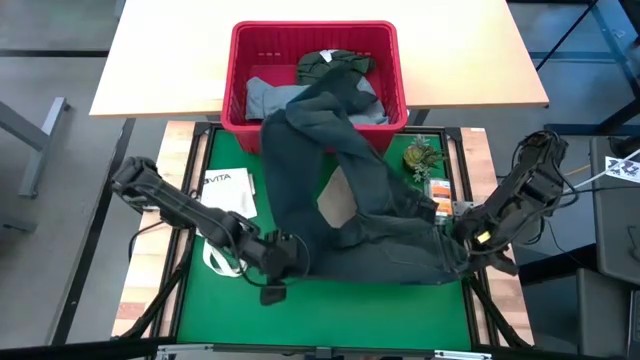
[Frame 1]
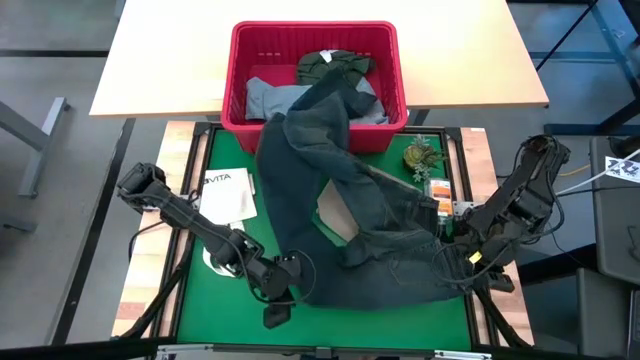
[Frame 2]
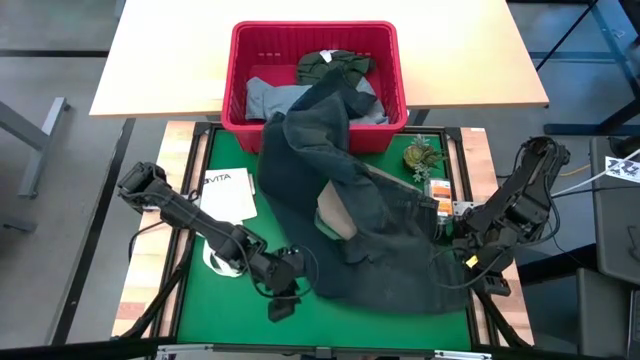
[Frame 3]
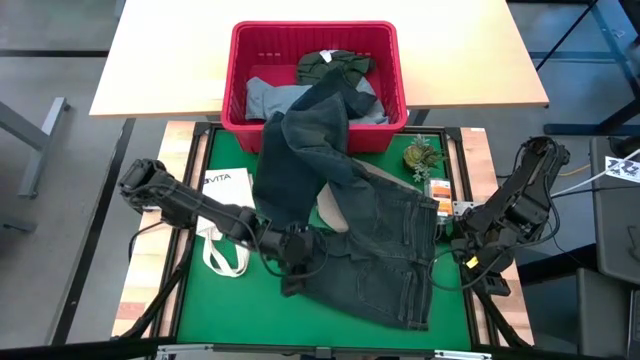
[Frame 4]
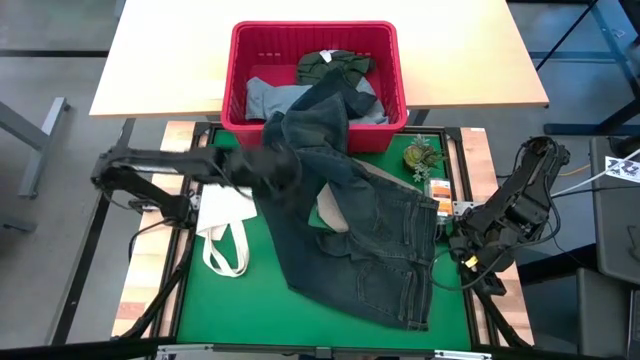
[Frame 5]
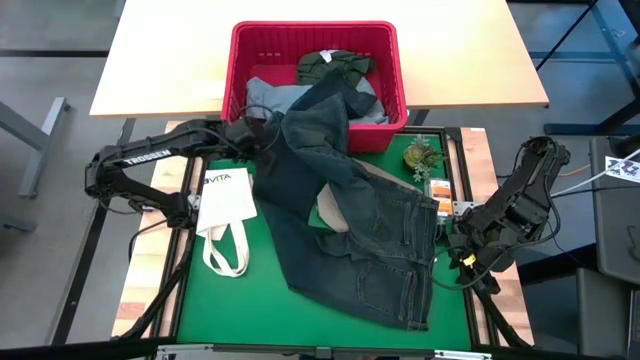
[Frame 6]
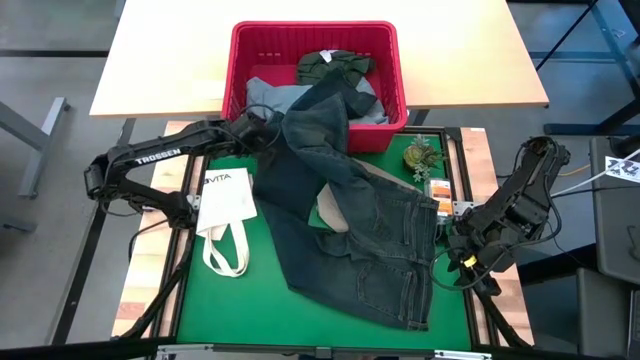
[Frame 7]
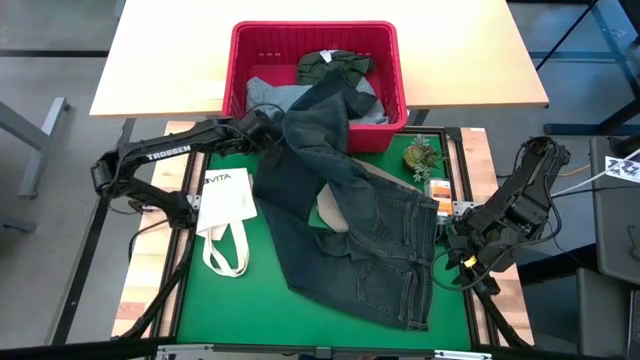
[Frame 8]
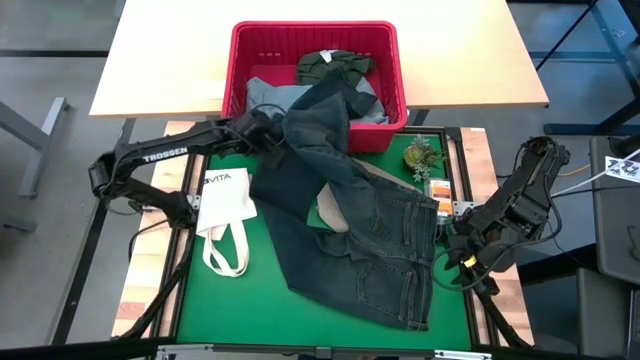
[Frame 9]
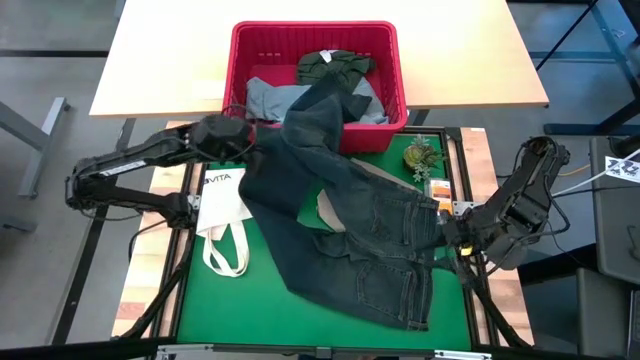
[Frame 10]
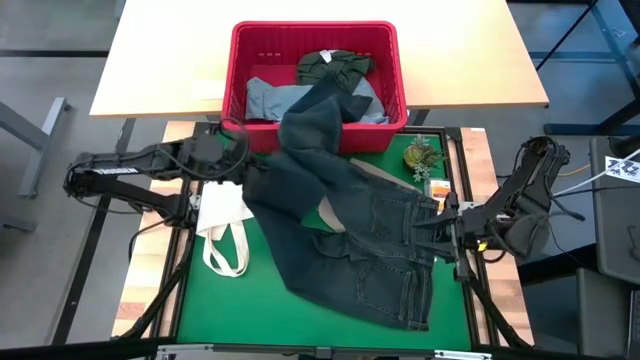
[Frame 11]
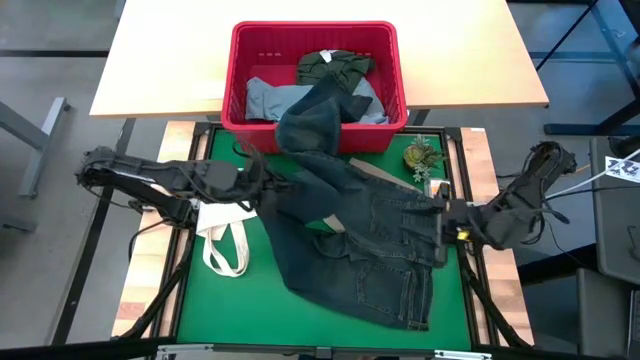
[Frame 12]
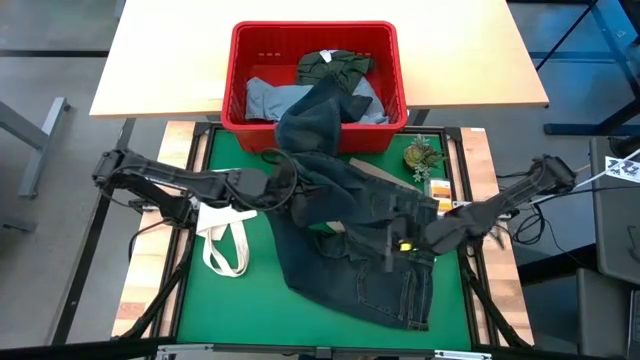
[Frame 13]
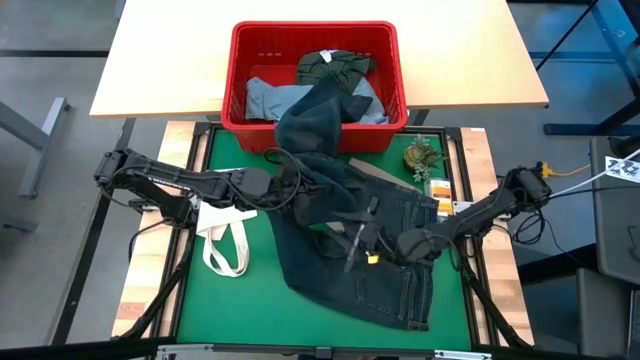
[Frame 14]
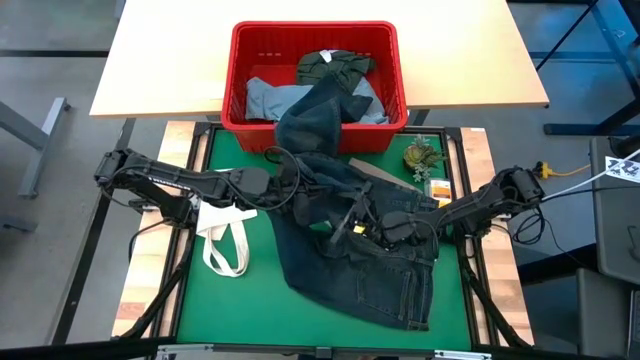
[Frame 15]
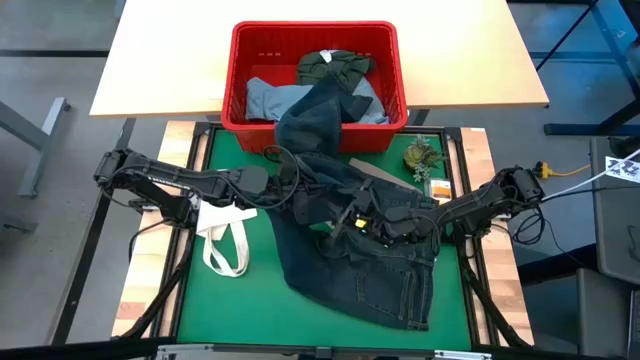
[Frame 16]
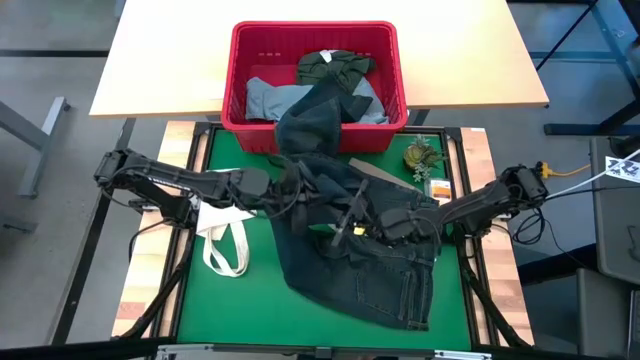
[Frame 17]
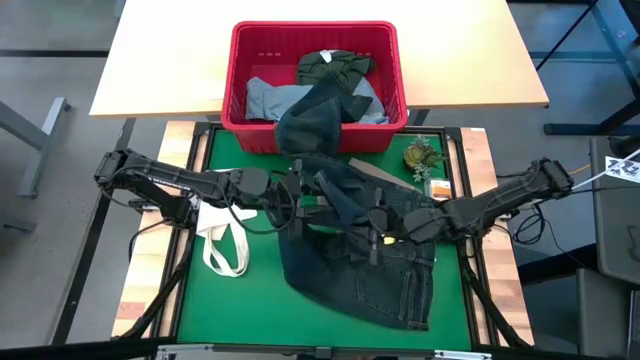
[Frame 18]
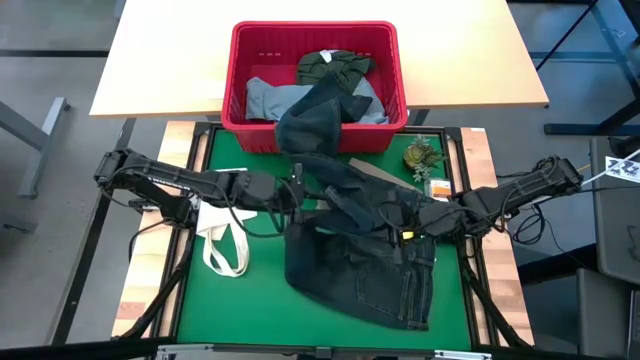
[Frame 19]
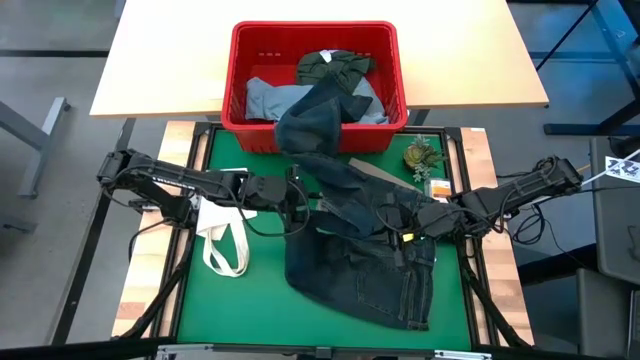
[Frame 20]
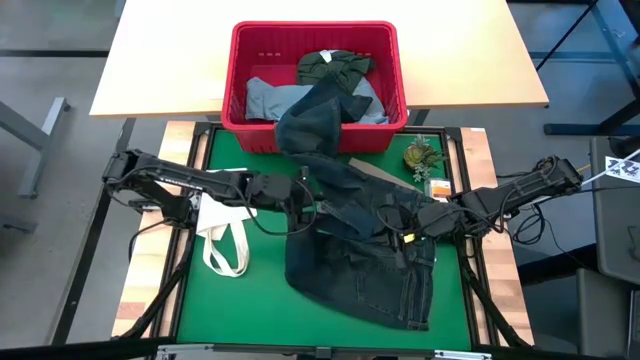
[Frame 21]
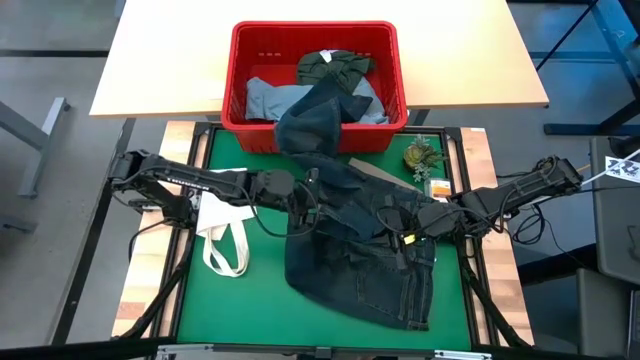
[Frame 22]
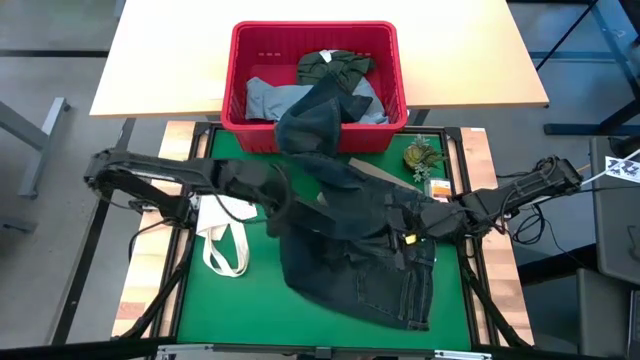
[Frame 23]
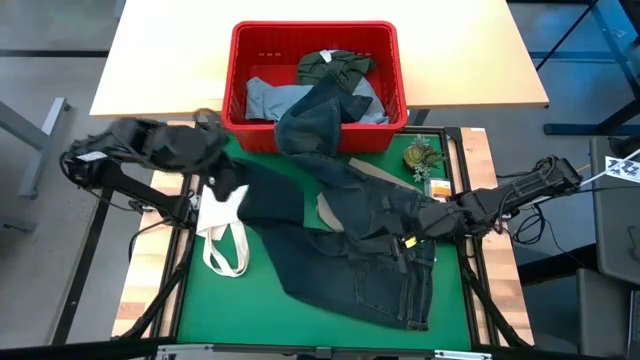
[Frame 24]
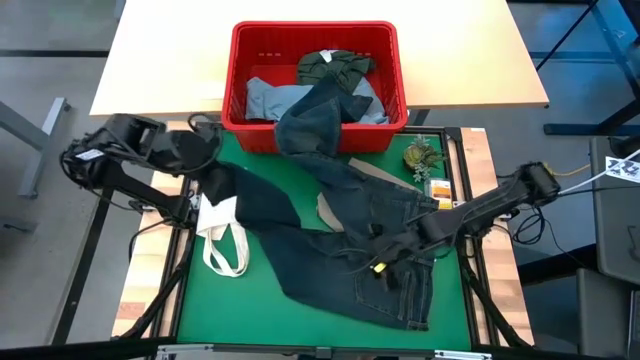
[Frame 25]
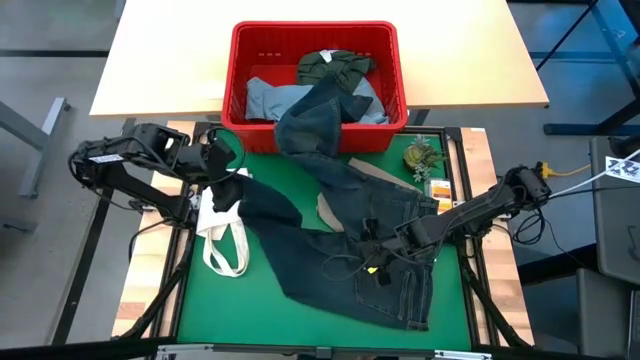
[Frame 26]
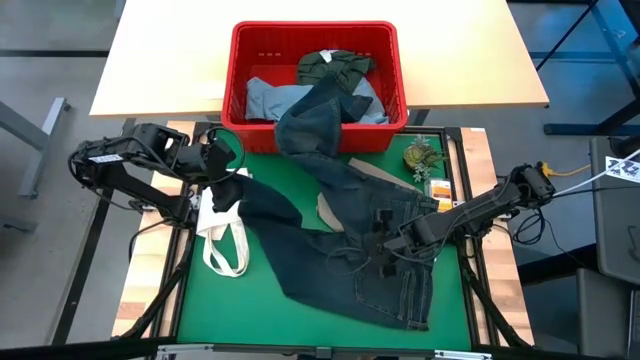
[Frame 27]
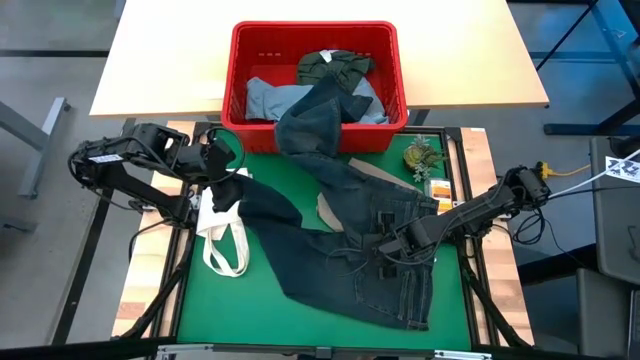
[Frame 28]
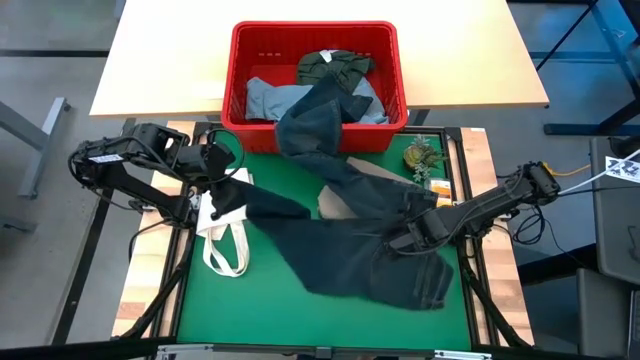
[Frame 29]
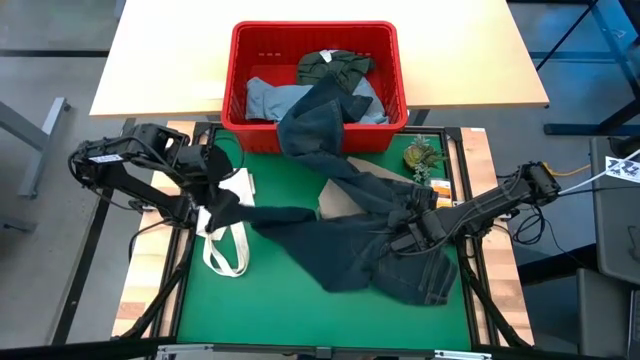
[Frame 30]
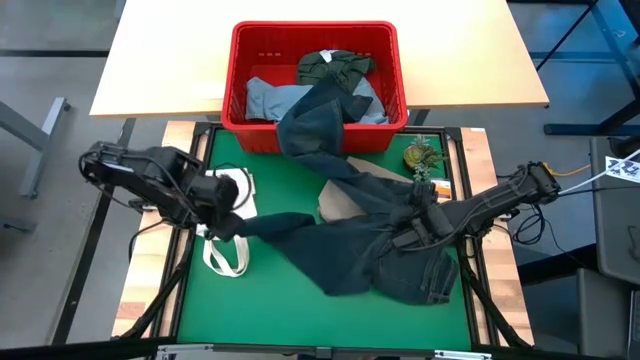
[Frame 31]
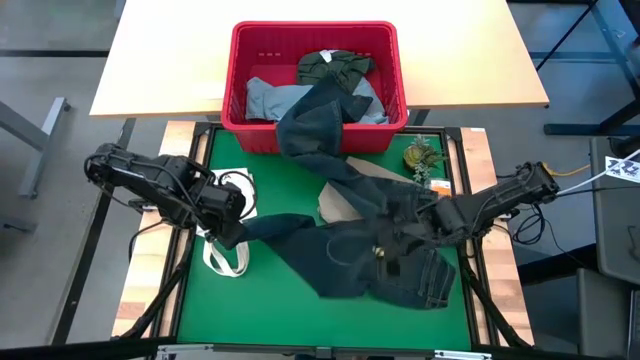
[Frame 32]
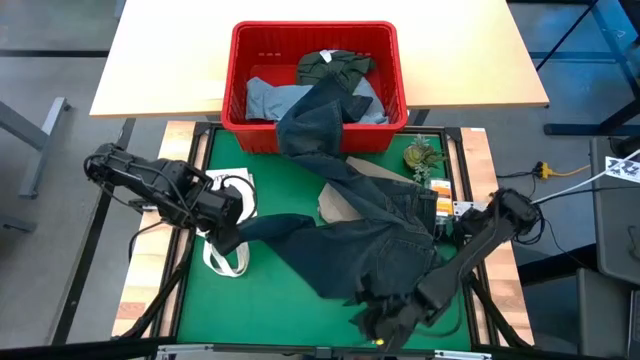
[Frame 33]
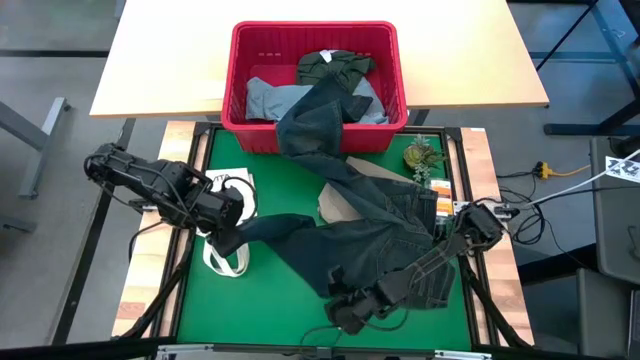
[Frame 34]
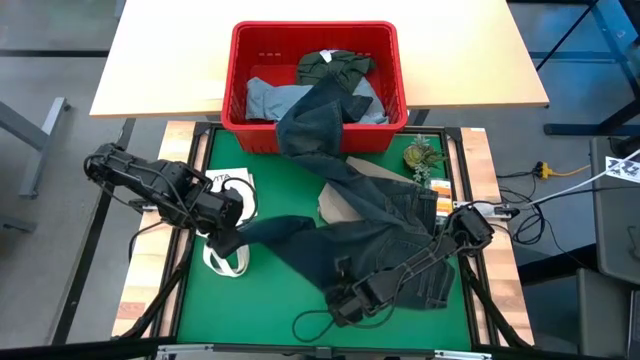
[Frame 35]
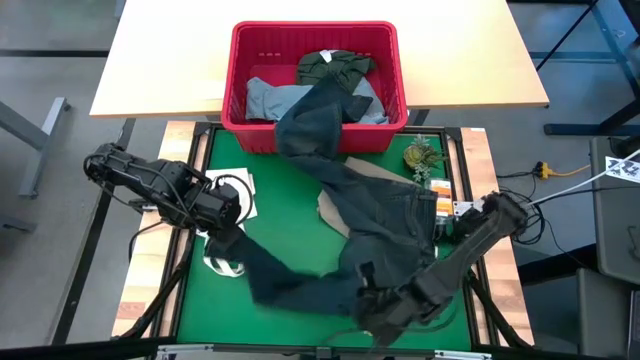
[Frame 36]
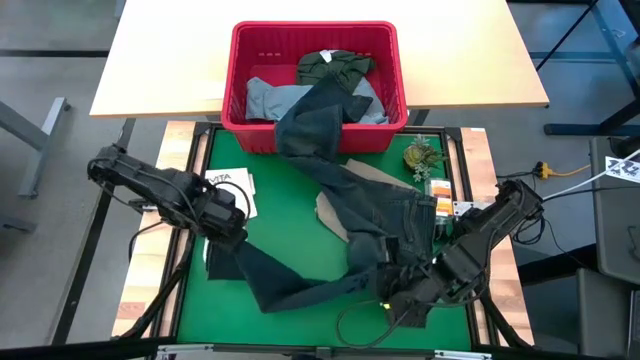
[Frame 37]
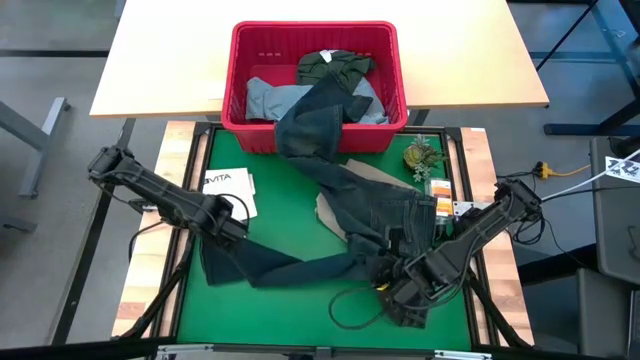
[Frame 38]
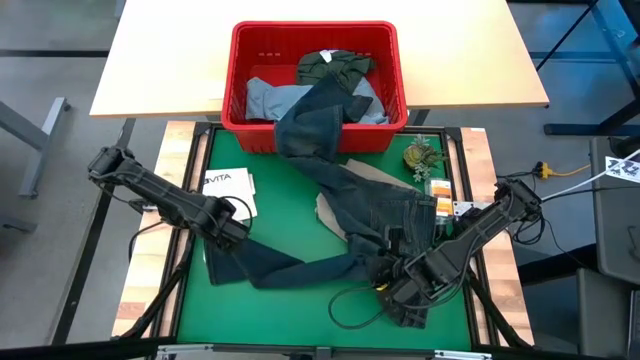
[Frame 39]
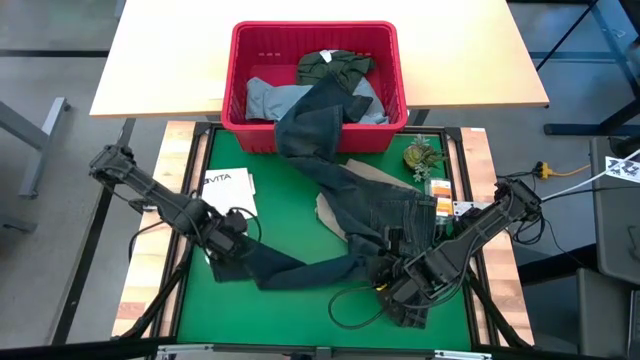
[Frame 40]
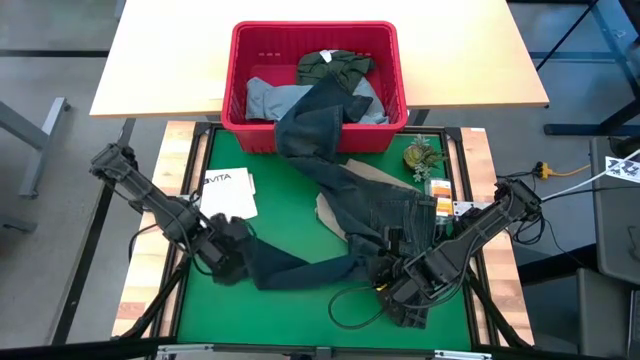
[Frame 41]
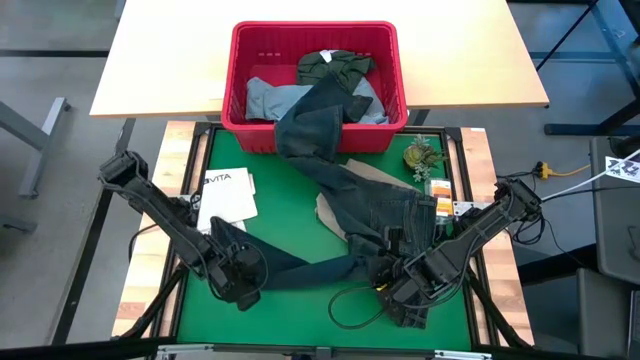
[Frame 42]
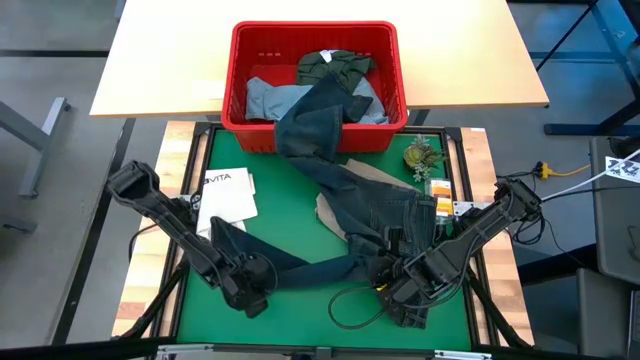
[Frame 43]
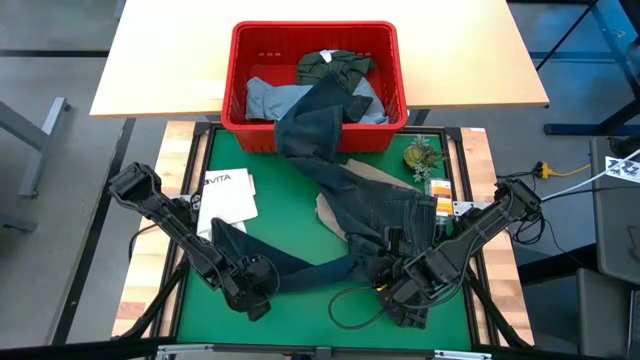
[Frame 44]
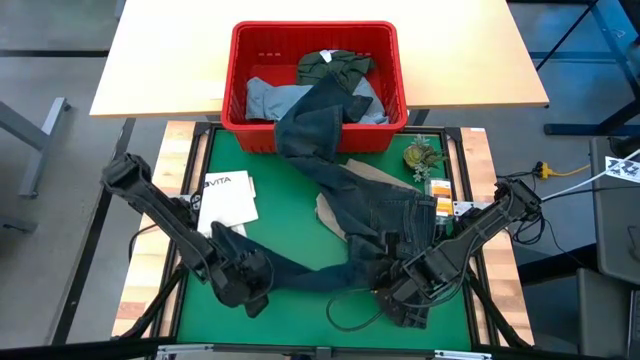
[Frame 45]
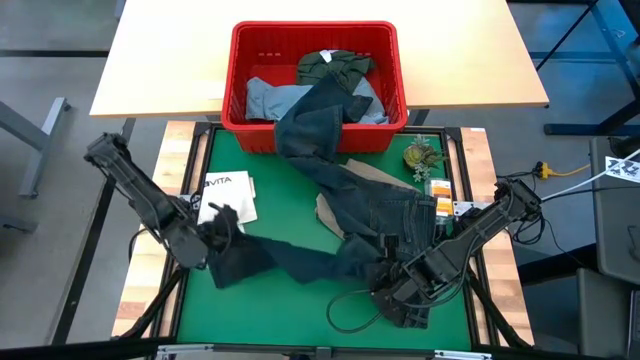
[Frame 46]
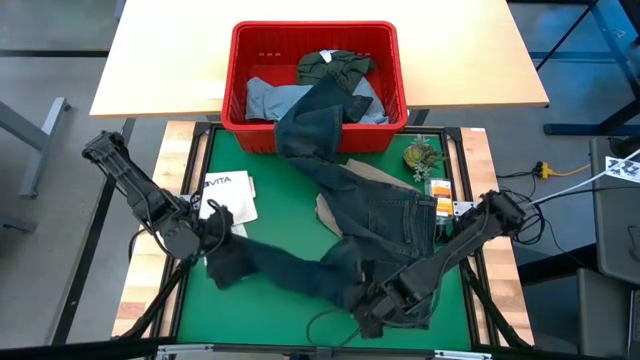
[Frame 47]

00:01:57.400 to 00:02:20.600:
Task: Fold Laundry from Bin
Fold the dark blue jeans
